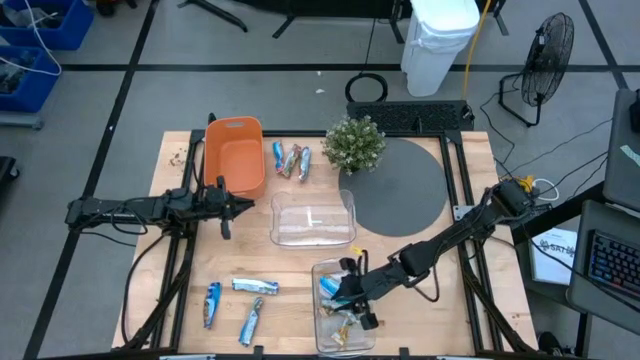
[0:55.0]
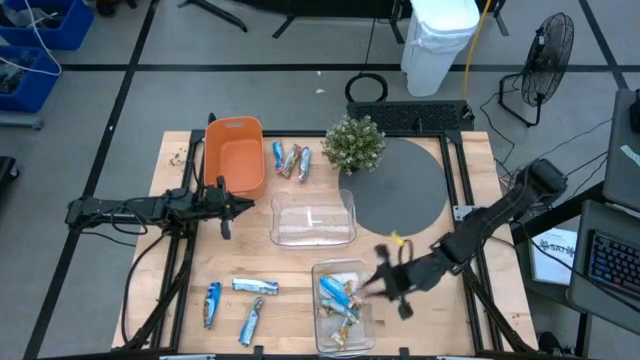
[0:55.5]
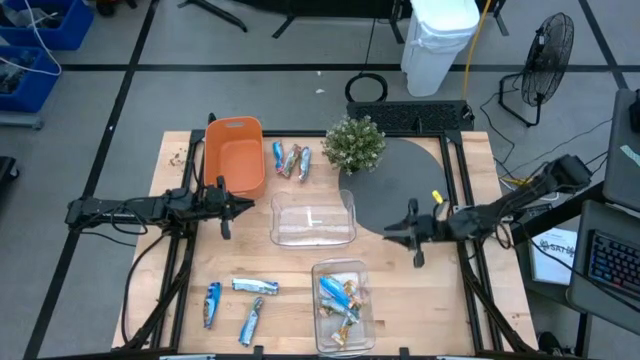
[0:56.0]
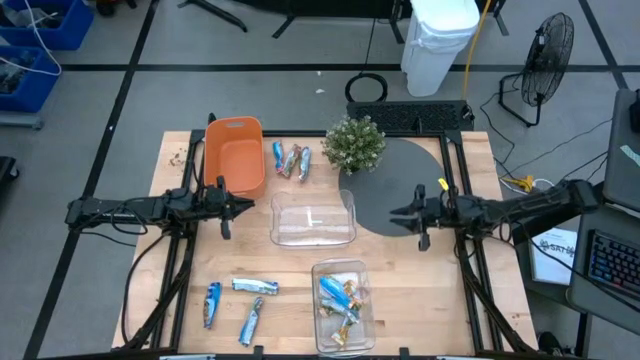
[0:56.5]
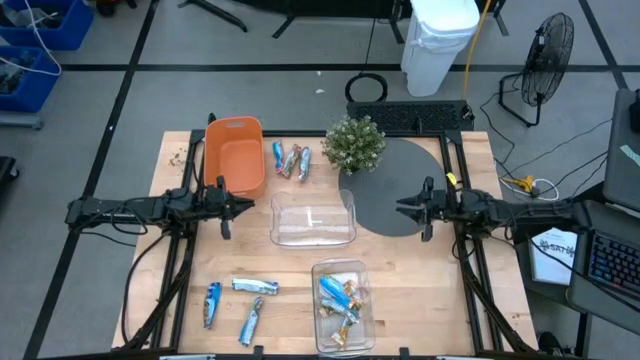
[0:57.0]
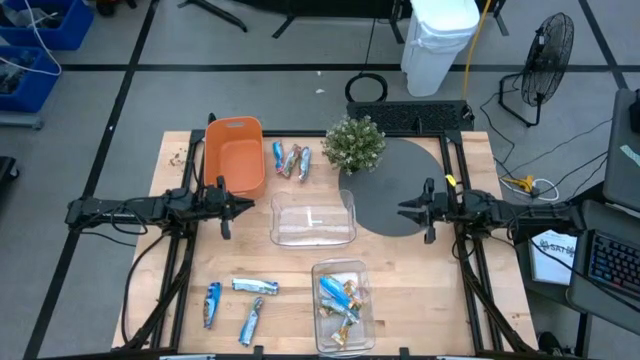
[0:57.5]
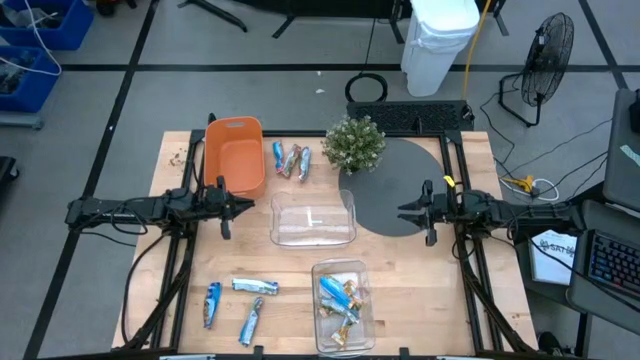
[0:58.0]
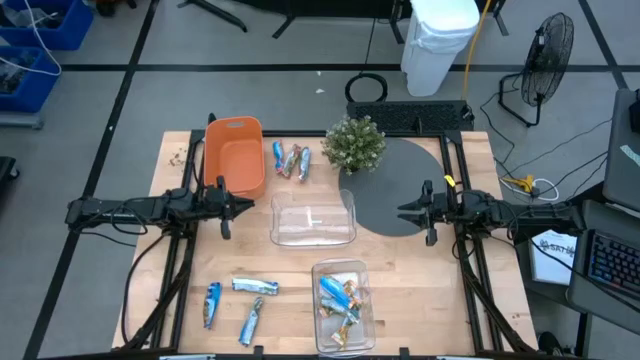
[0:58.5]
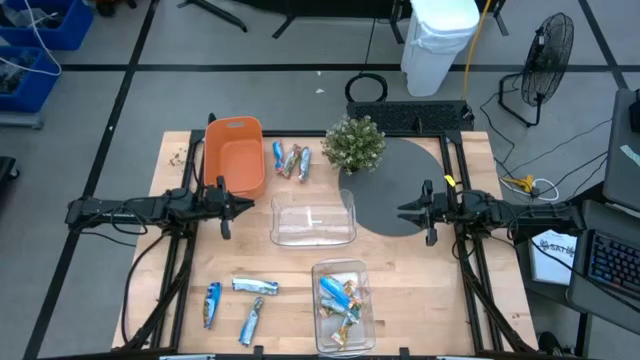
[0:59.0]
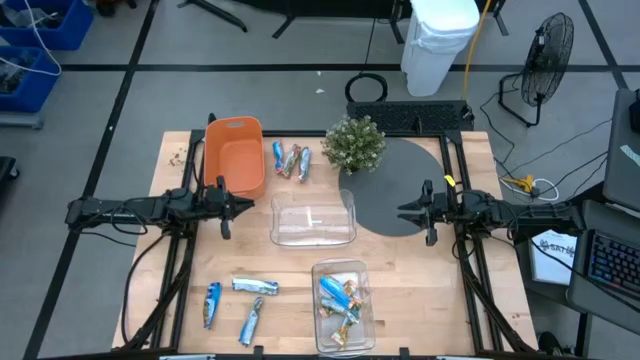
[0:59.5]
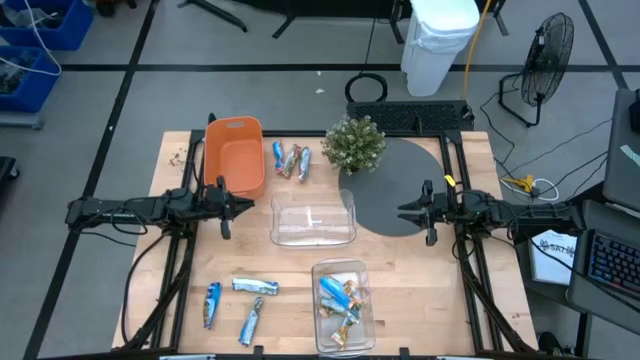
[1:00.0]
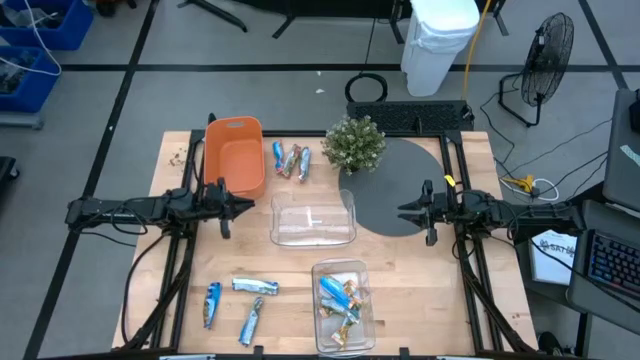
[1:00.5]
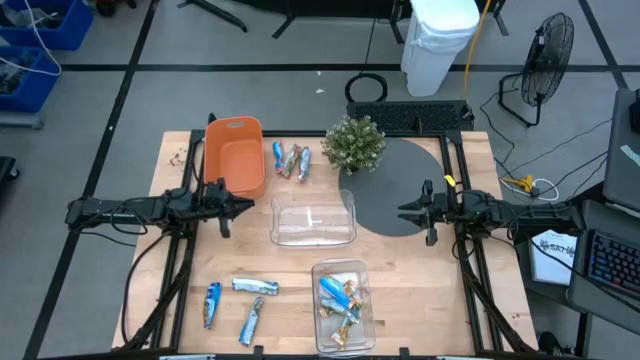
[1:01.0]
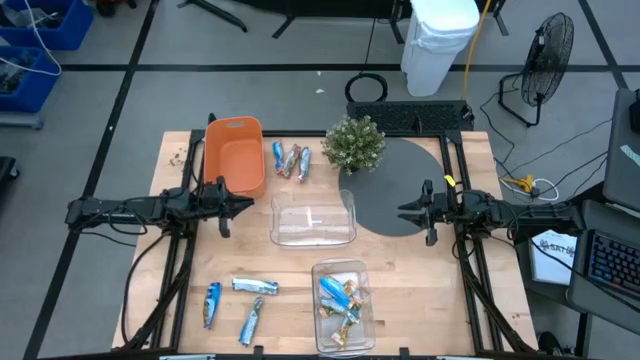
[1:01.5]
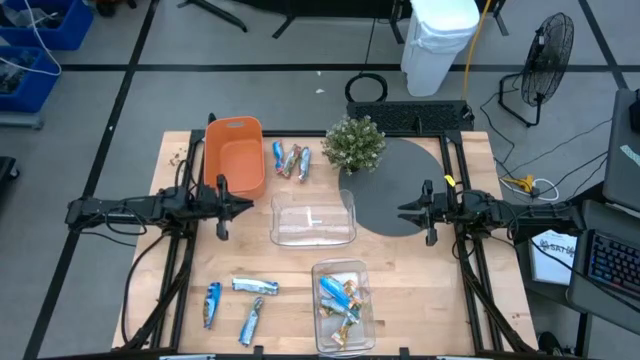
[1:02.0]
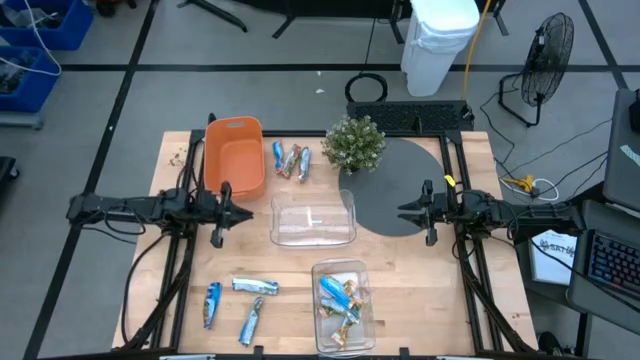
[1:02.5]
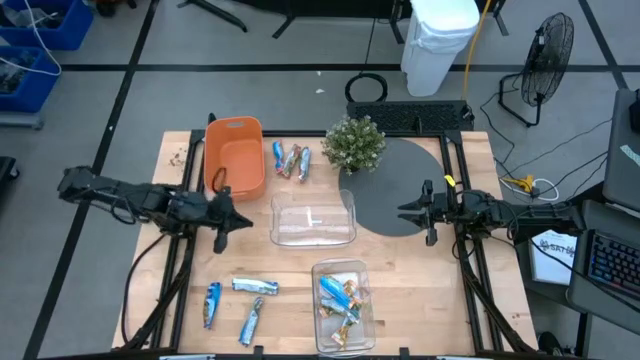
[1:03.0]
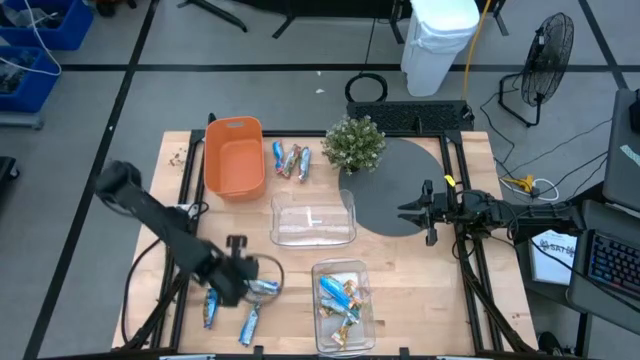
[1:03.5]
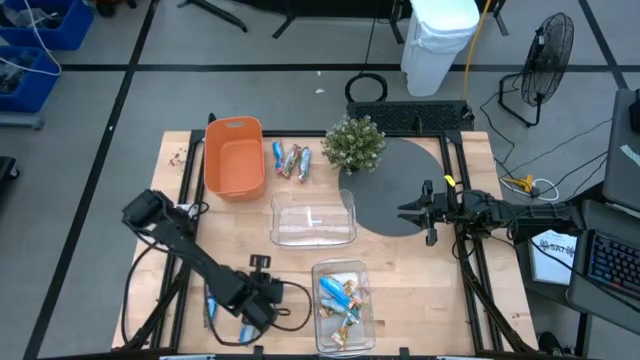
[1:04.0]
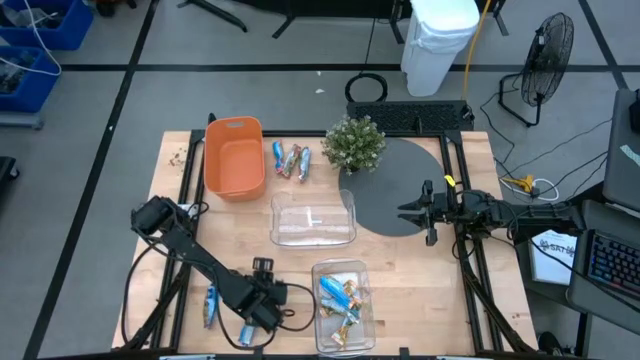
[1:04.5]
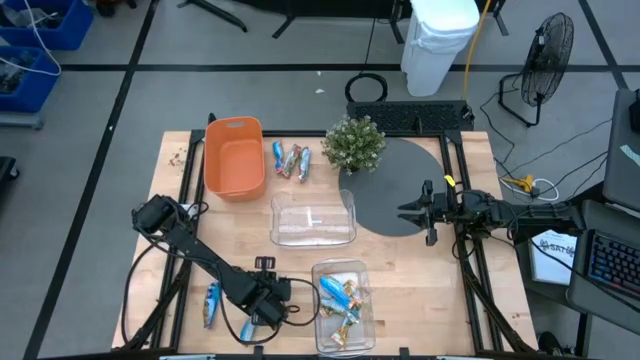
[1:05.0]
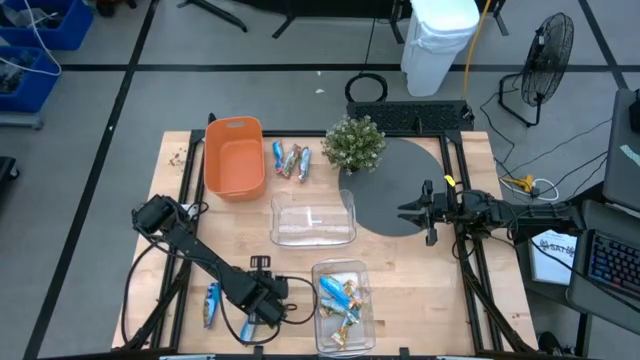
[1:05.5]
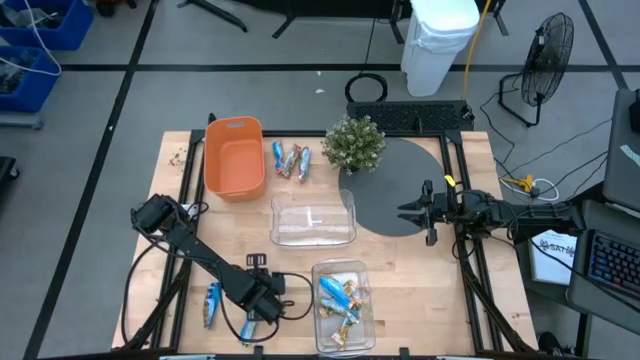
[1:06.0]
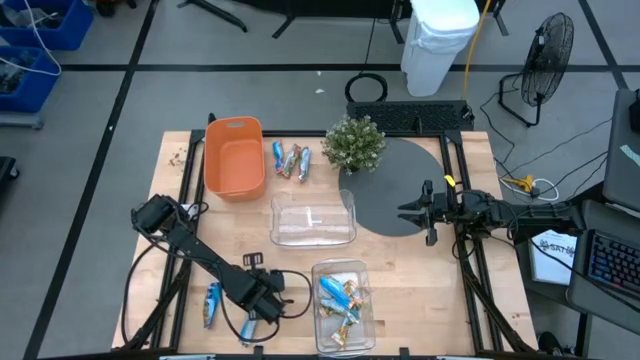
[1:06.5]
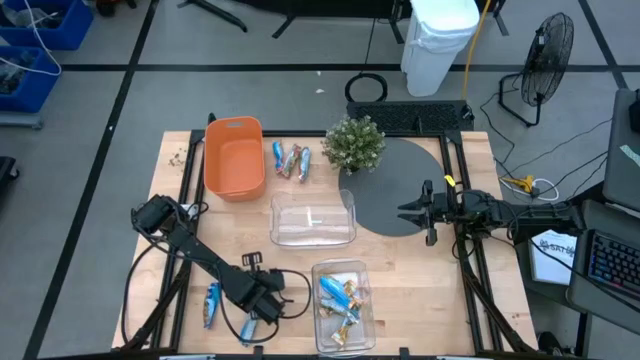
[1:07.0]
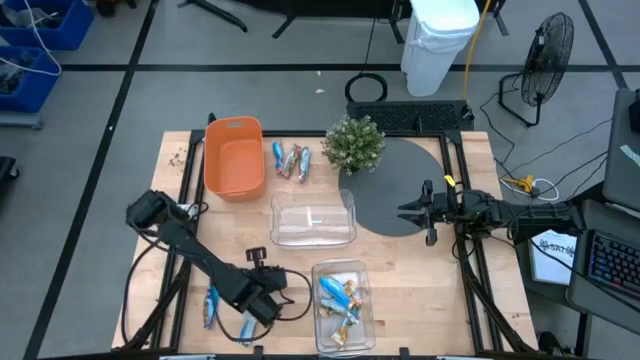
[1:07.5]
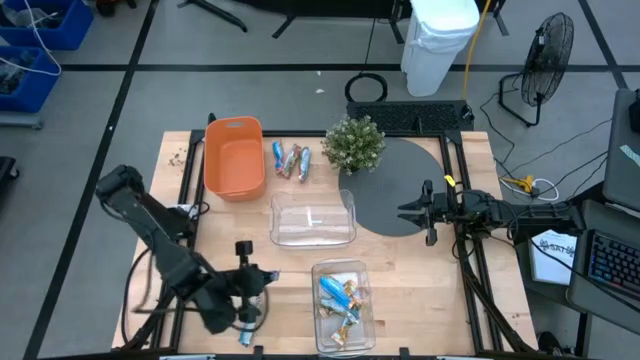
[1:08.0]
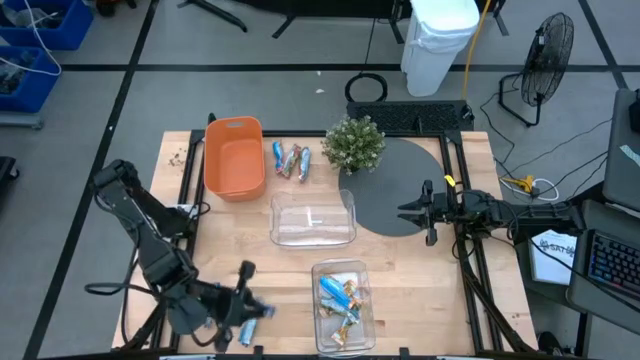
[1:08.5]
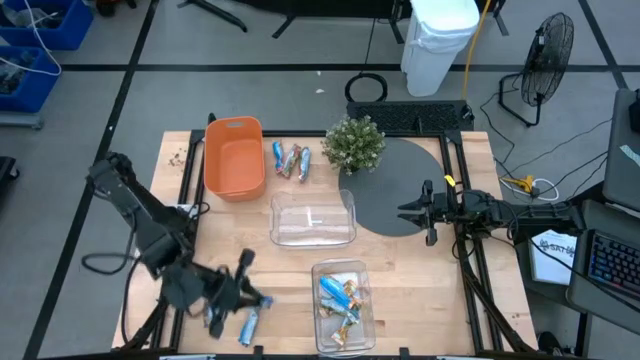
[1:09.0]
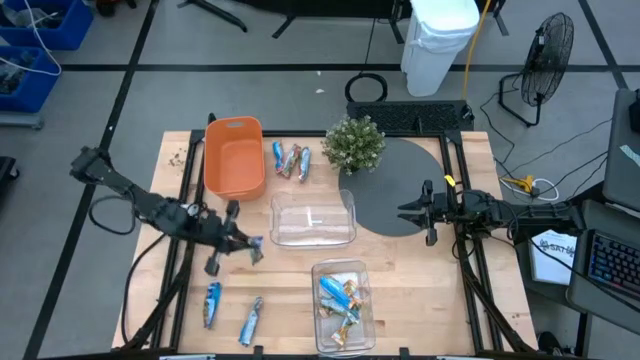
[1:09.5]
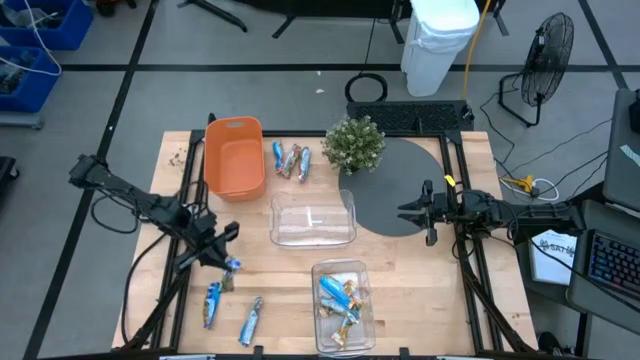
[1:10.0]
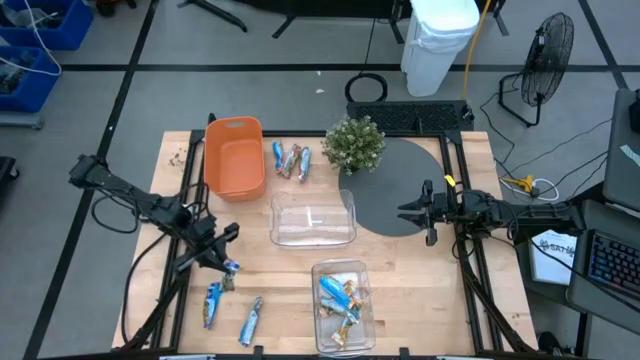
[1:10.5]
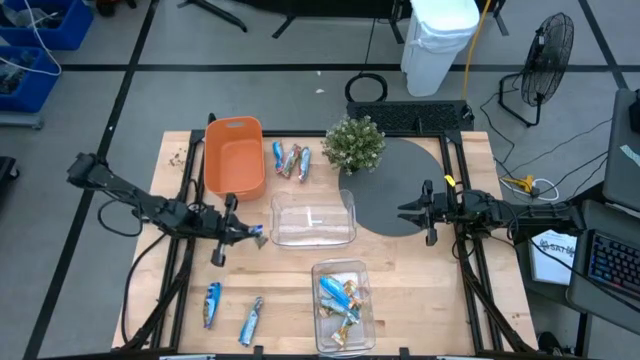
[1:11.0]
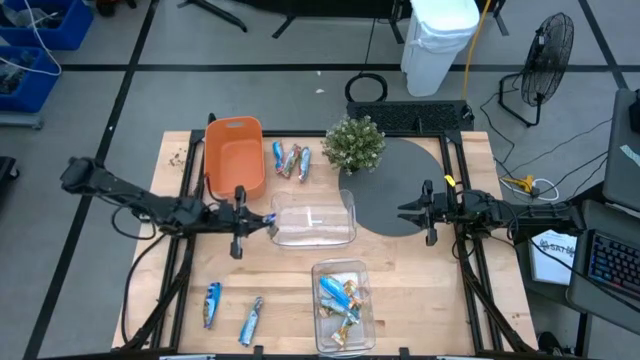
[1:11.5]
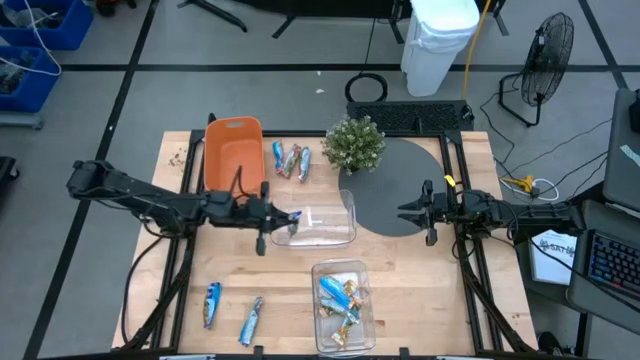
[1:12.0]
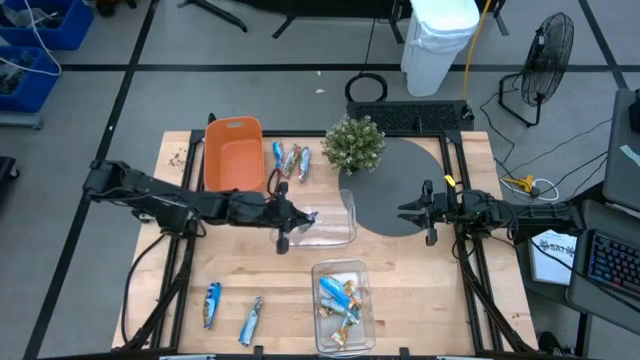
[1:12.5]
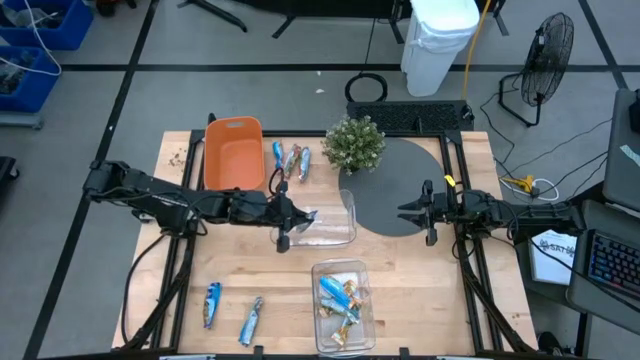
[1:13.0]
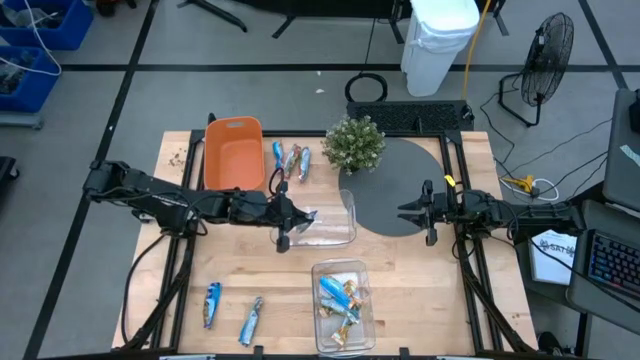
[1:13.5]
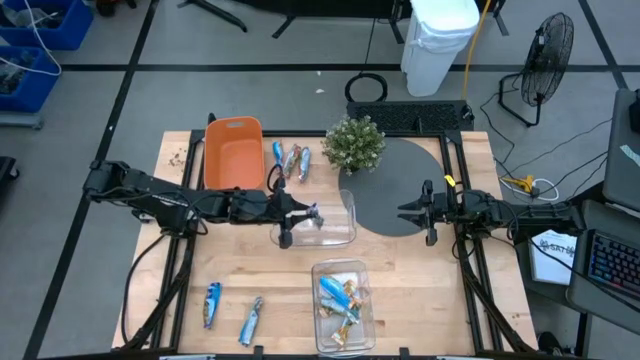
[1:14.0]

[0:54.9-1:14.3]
Task: Pick and place Granola Bars by type
Put the purple granola bar into the top transparent bin

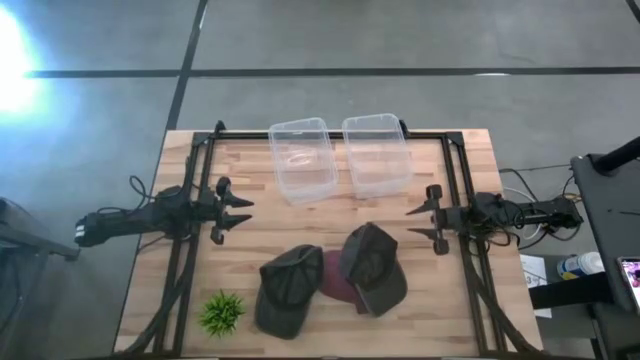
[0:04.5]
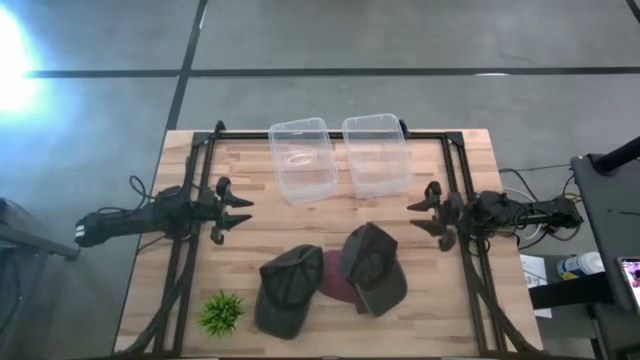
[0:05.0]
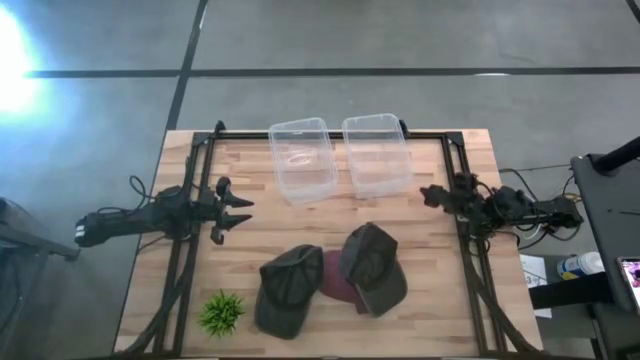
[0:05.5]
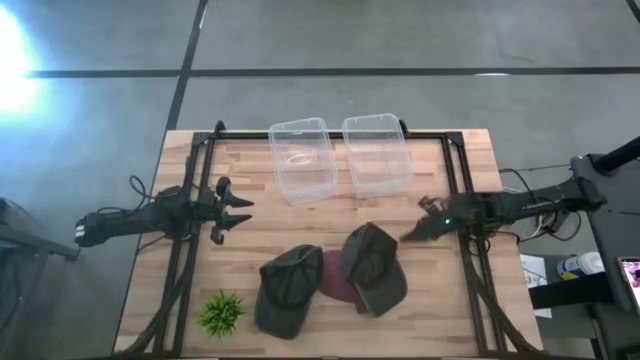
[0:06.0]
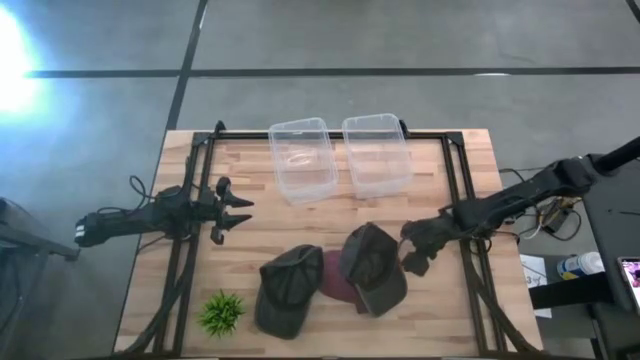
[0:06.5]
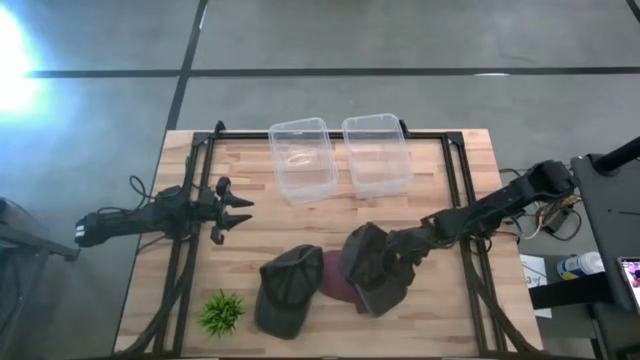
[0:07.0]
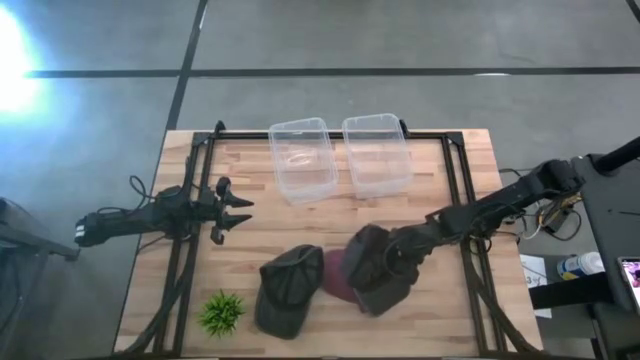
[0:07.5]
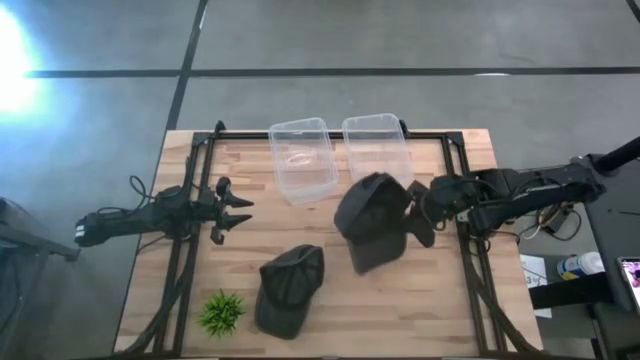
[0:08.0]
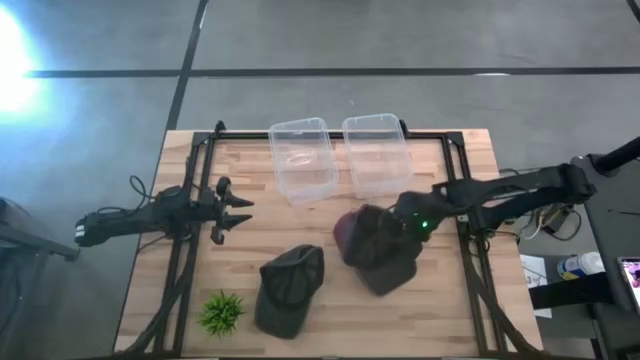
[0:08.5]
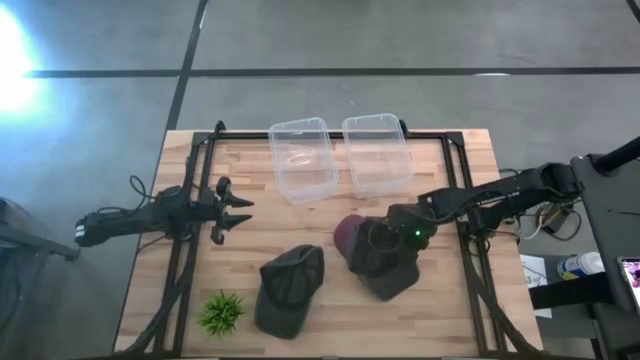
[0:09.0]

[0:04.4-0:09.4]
Task: Pick and place caps into container
Put the right black cap into the right transparent container
